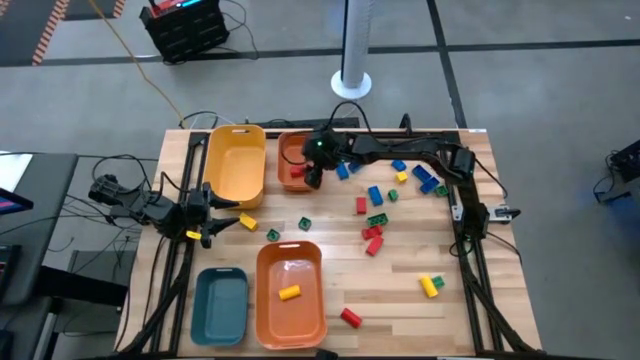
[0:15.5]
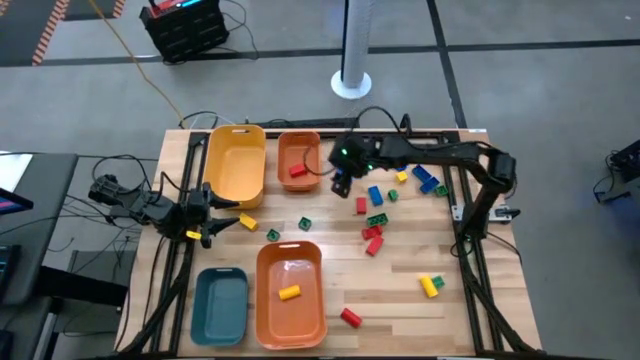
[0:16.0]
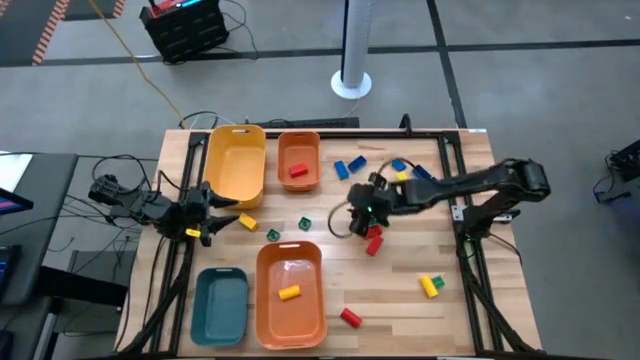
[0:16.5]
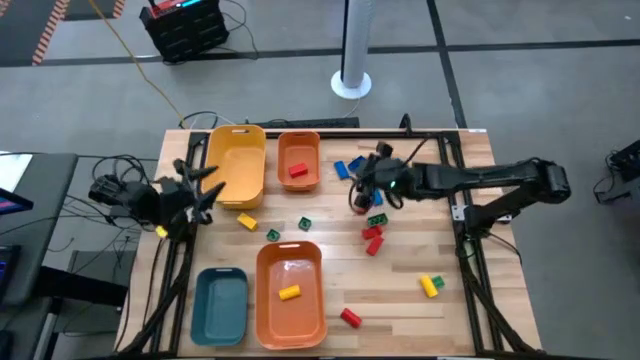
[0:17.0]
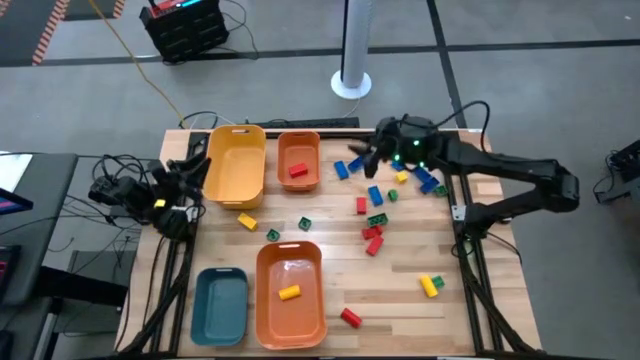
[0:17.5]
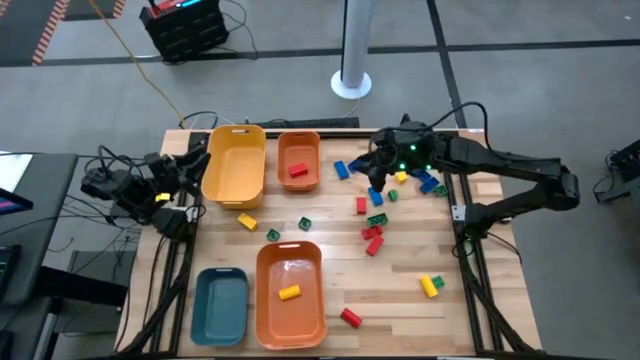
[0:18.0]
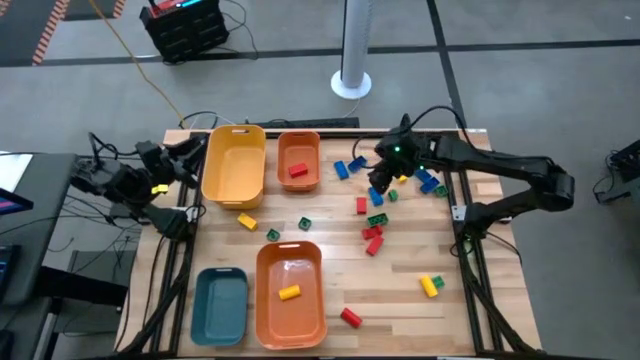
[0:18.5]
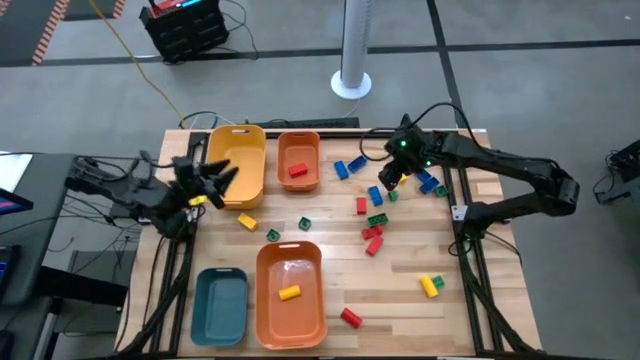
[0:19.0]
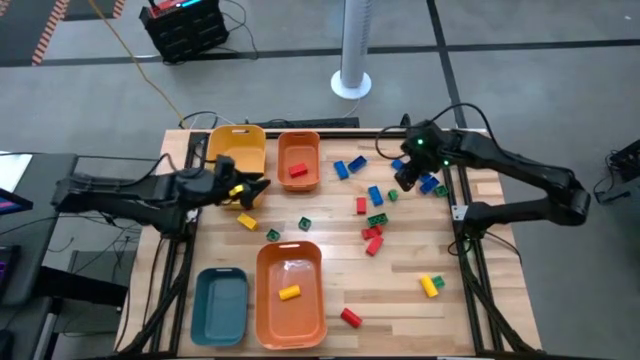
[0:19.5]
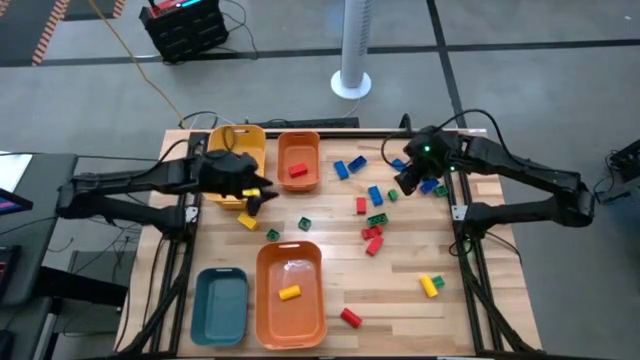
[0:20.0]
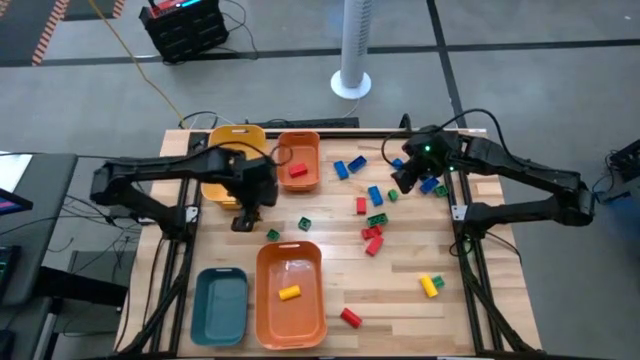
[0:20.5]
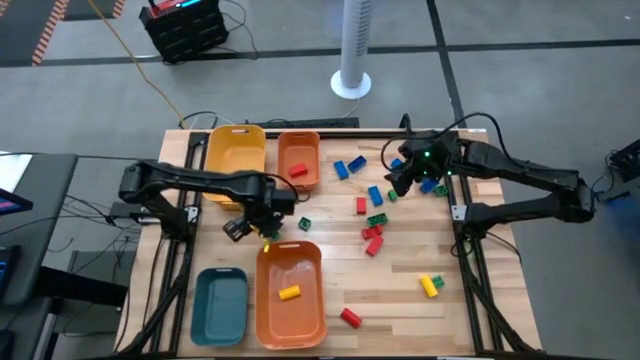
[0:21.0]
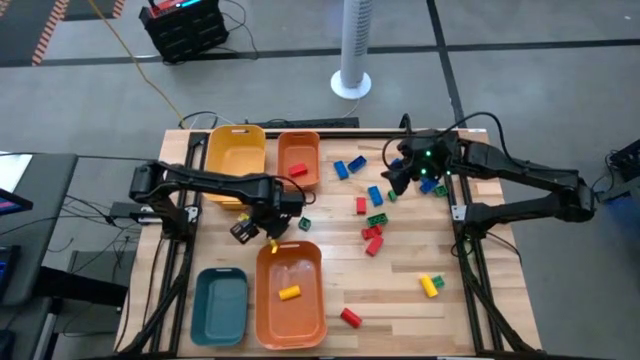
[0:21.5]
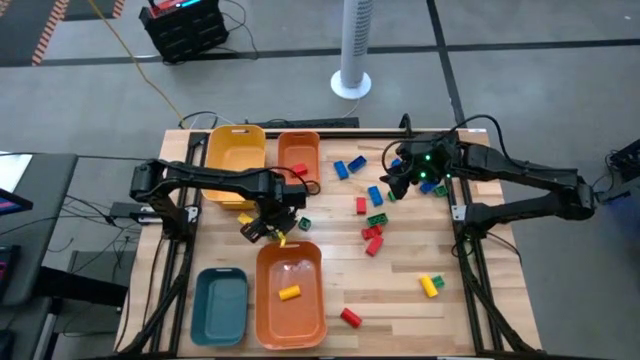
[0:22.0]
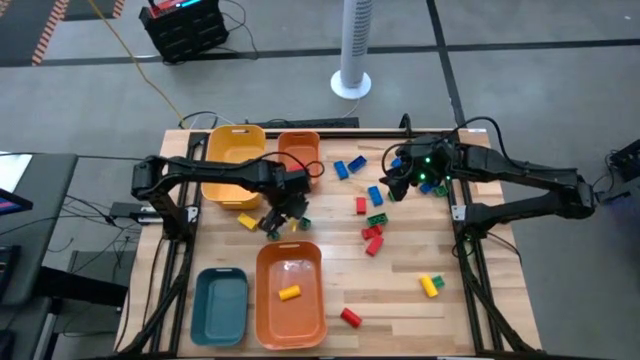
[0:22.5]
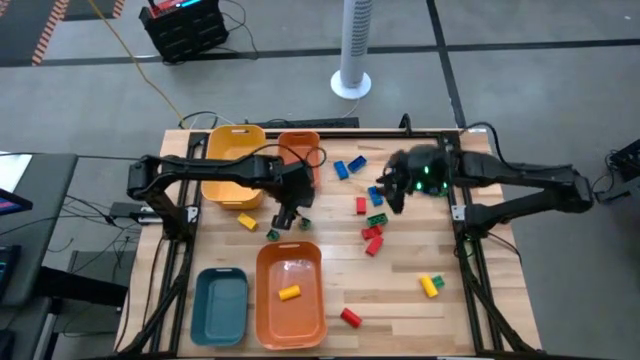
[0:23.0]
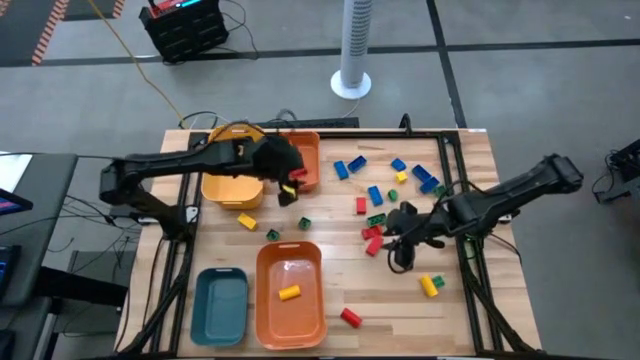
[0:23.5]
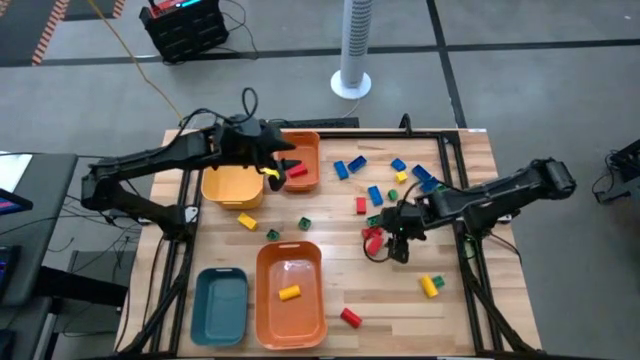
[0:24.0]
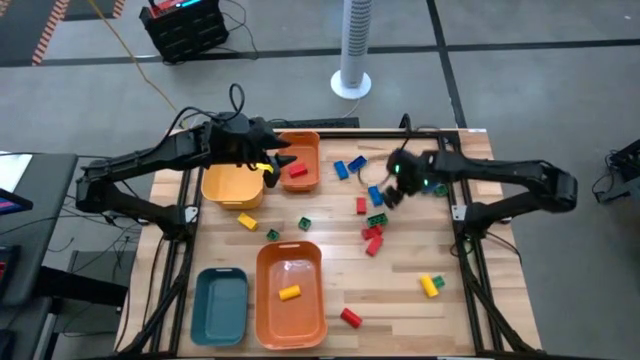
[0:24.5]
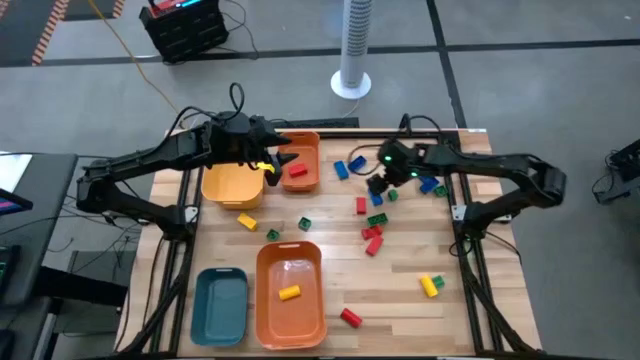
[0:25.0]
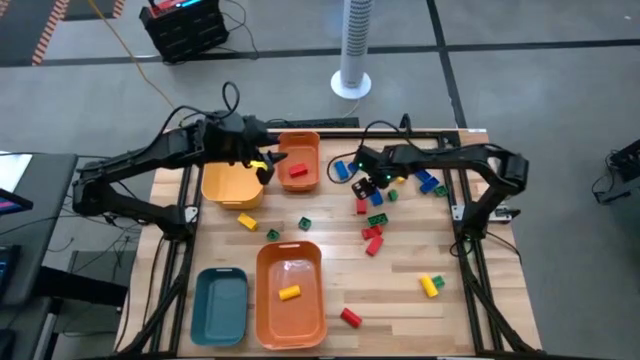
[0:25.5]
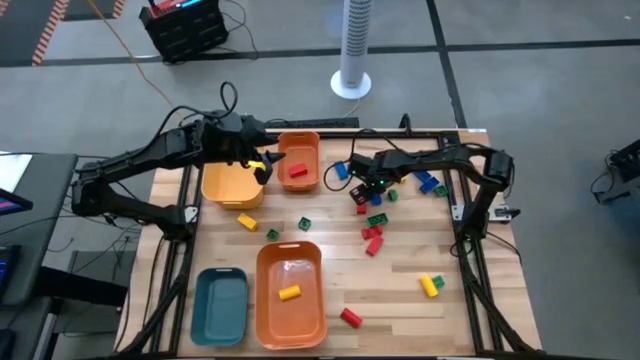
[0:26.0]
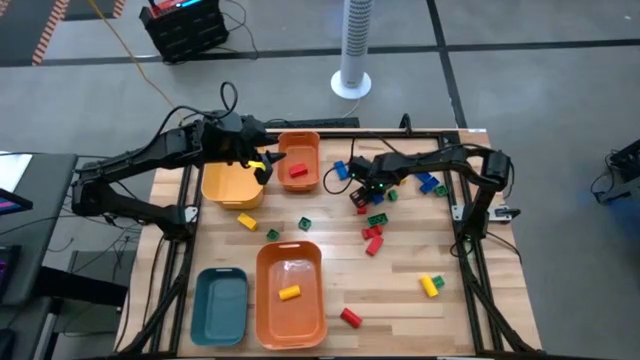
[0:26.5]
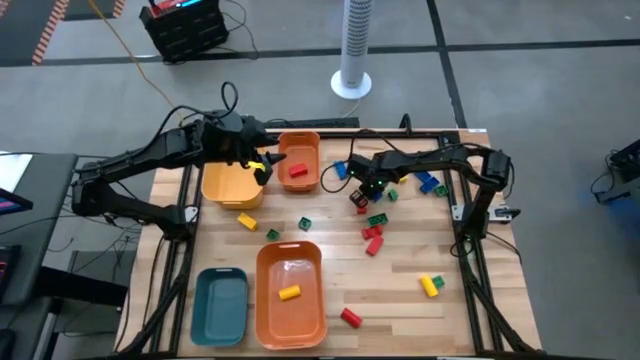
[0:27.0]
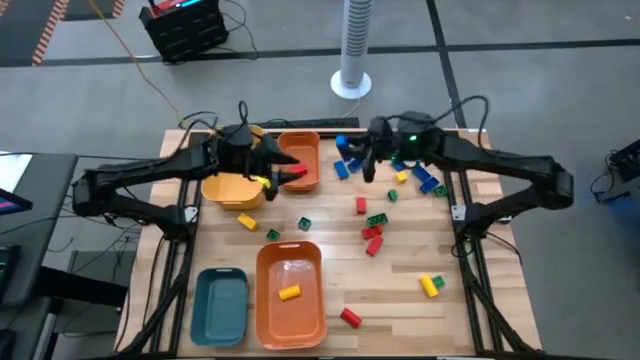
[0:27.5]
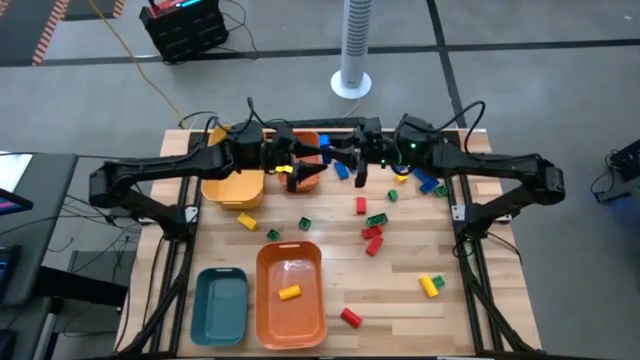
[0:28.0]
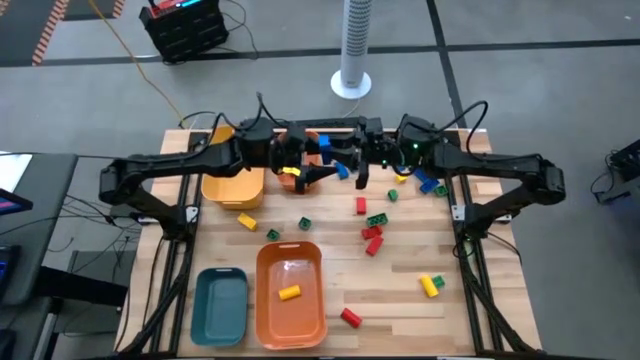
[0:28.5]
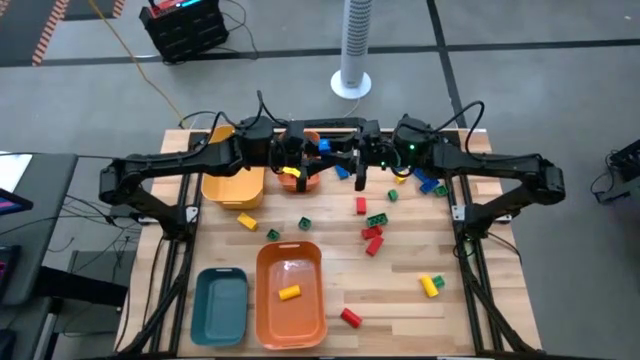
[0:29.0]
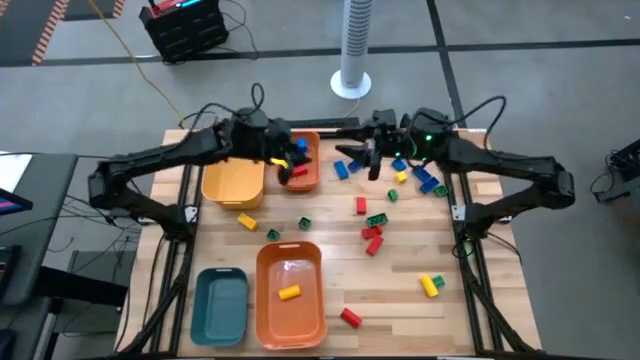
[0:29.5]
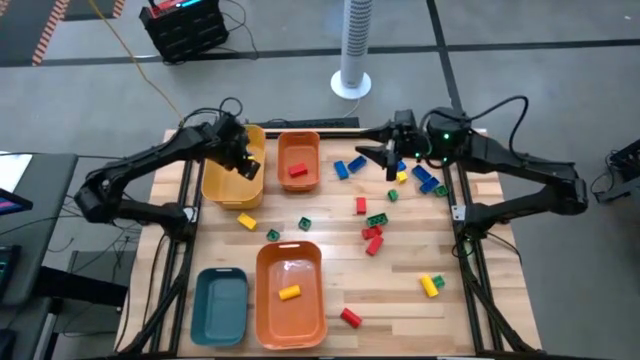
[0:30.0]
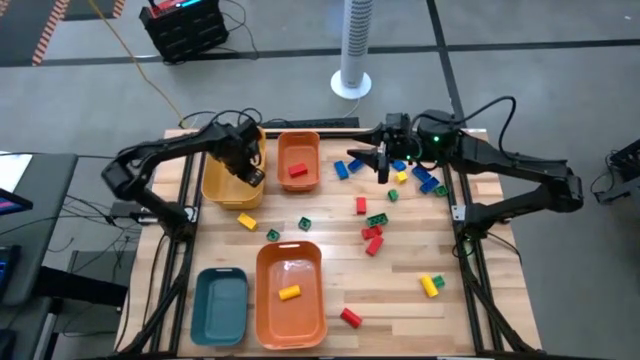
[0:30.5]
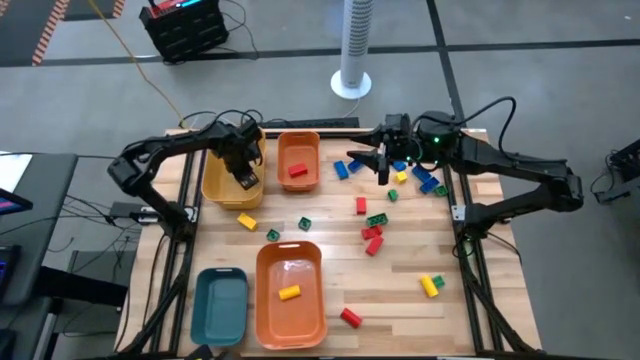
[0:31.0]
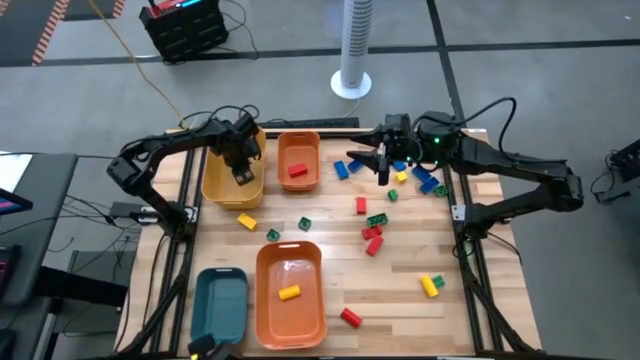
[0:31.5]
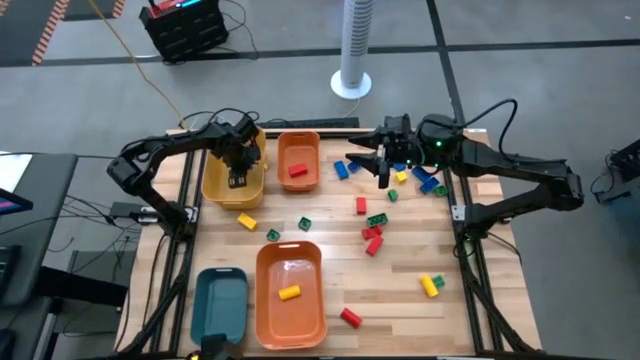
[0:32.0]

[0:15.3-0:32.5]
Task: Sort blocks
Put the blue game piece into the yellow bin
